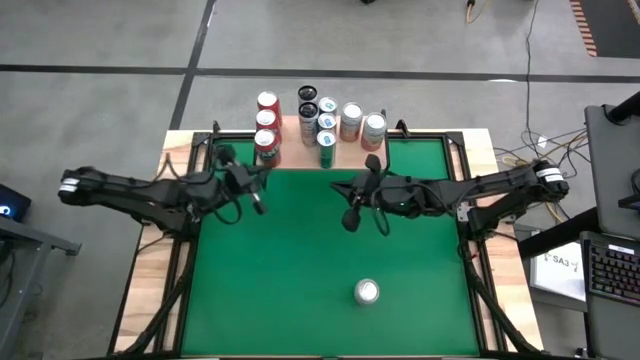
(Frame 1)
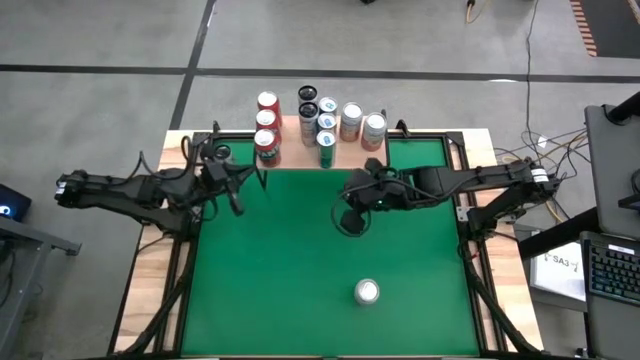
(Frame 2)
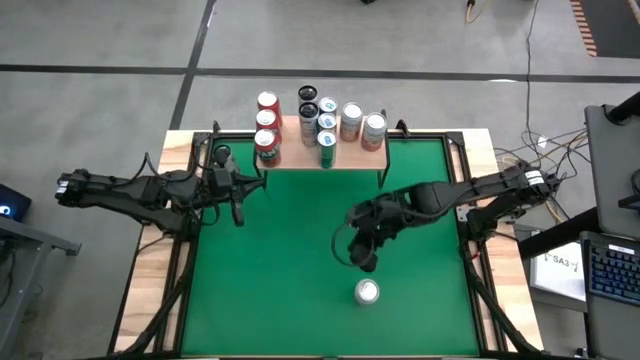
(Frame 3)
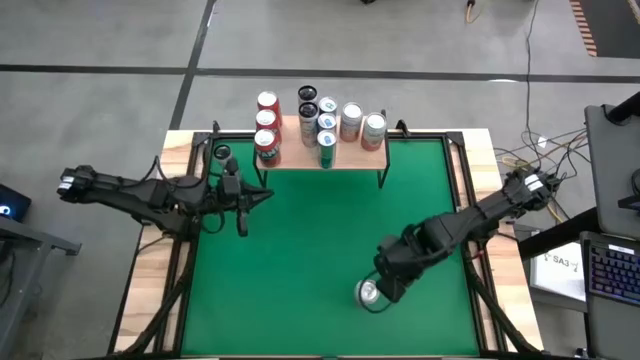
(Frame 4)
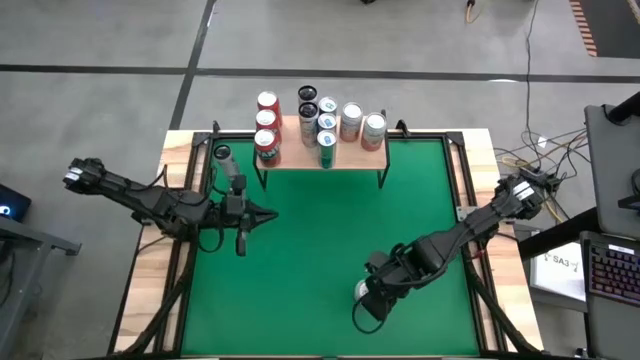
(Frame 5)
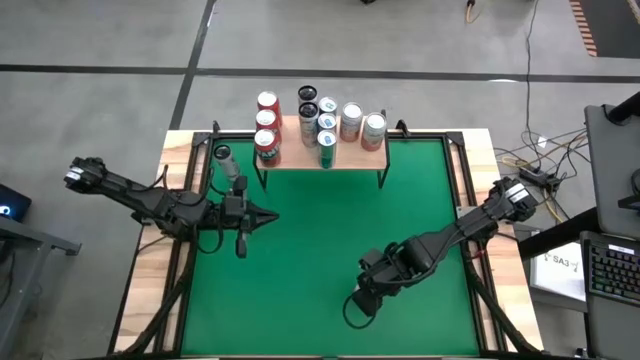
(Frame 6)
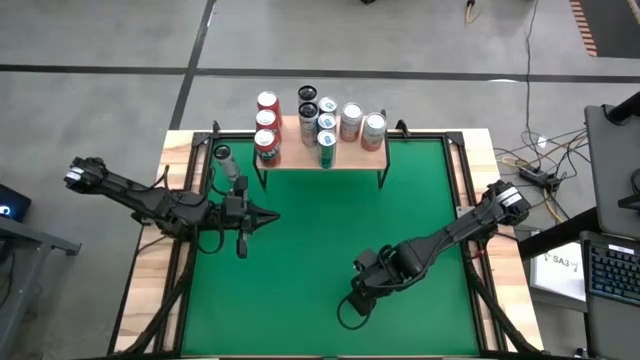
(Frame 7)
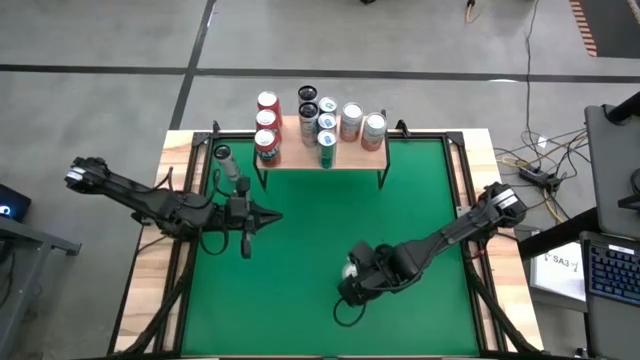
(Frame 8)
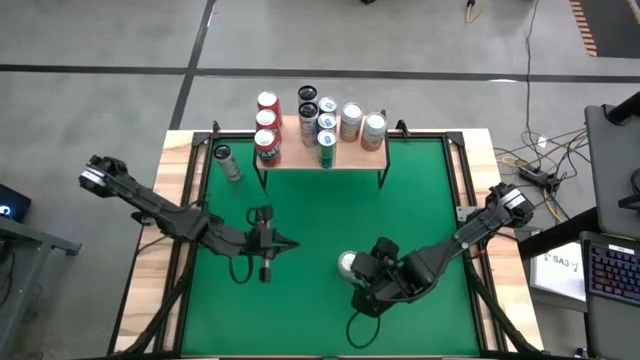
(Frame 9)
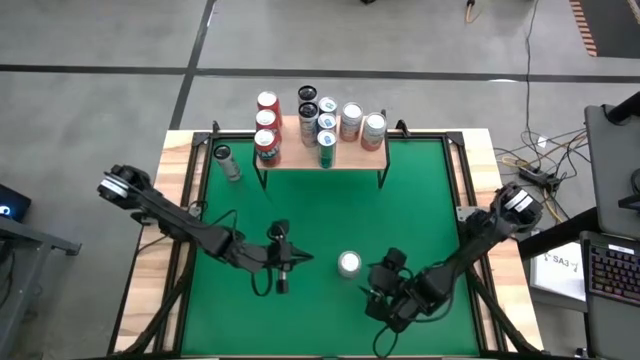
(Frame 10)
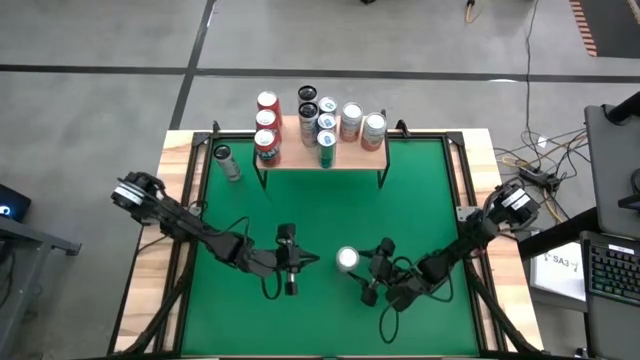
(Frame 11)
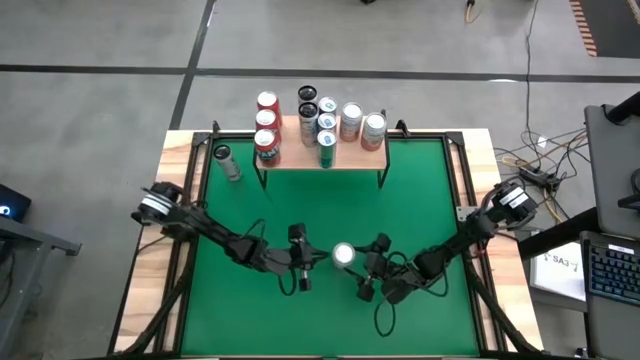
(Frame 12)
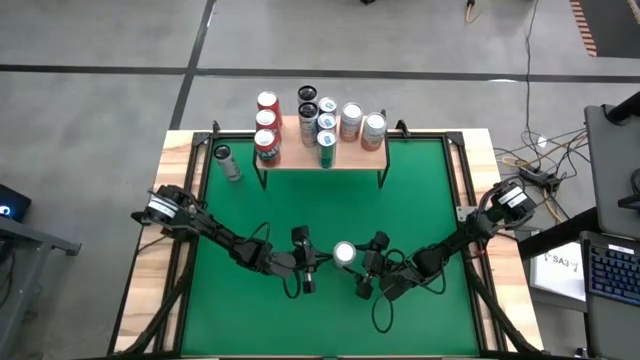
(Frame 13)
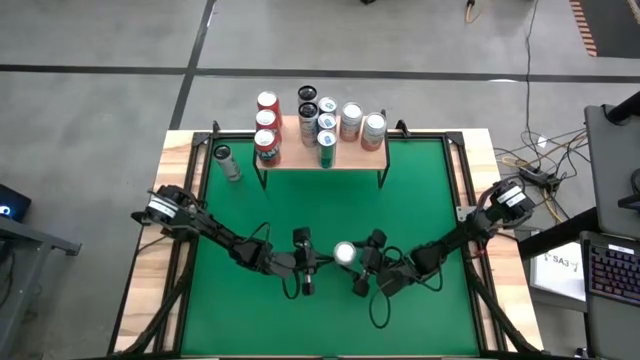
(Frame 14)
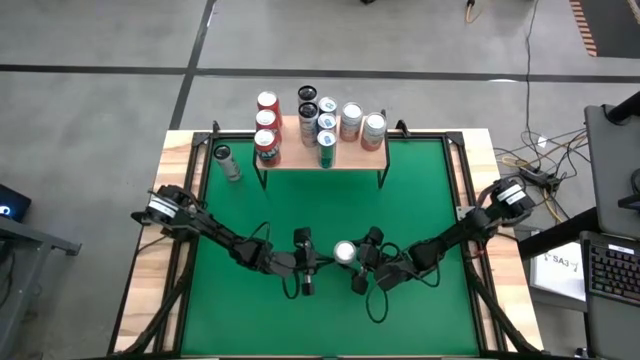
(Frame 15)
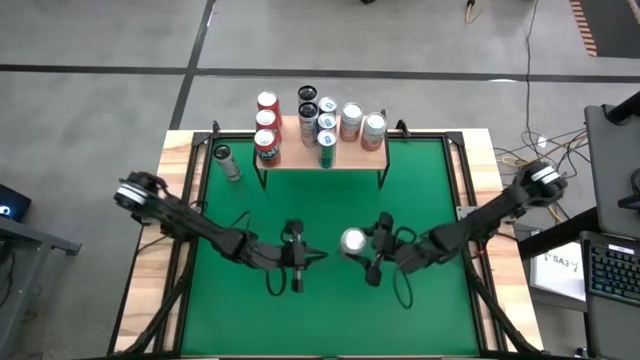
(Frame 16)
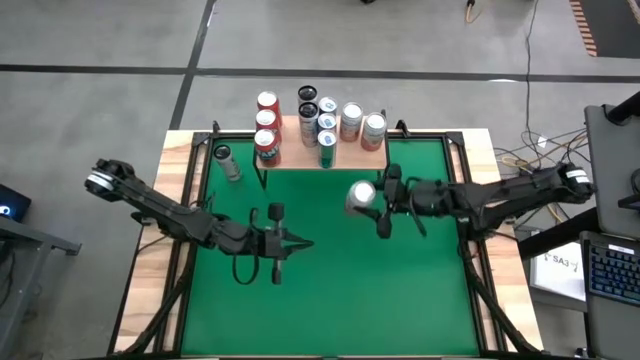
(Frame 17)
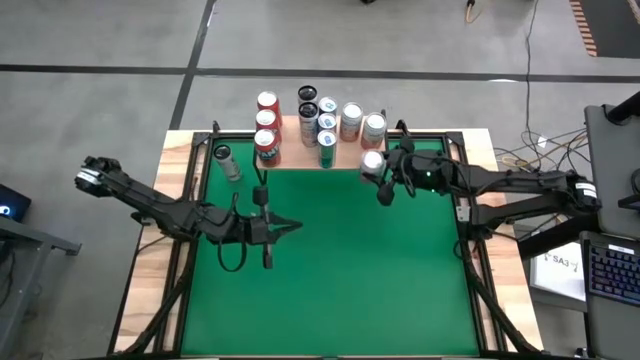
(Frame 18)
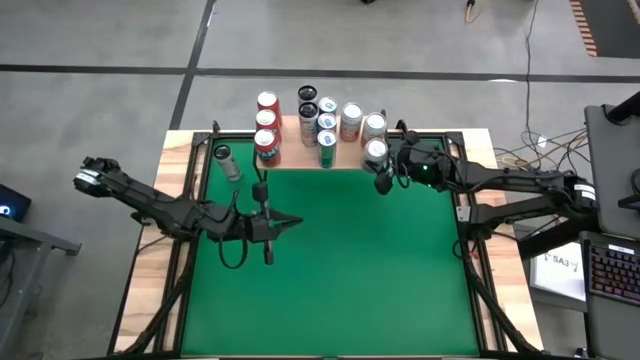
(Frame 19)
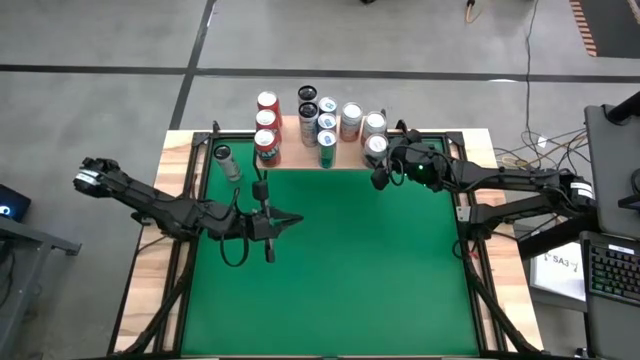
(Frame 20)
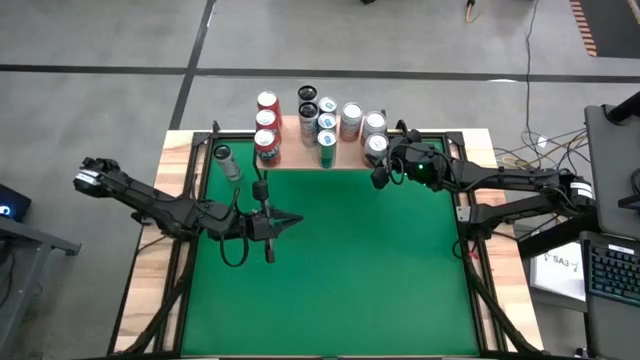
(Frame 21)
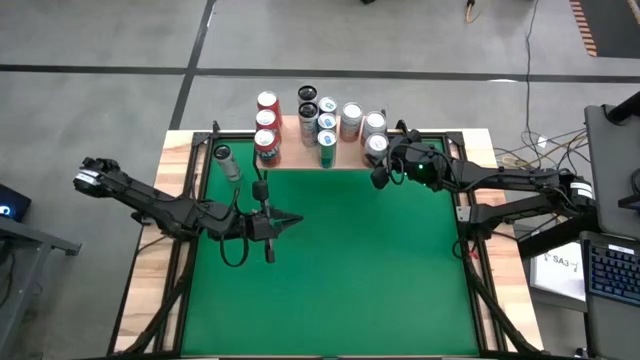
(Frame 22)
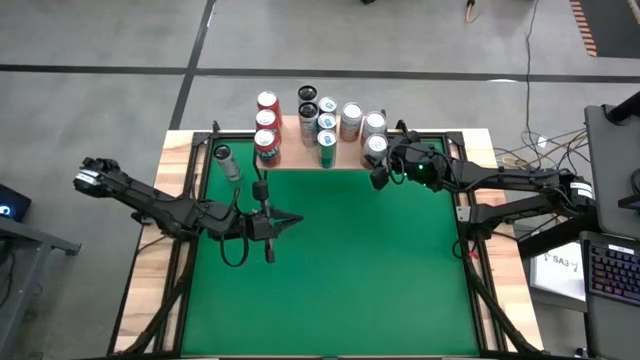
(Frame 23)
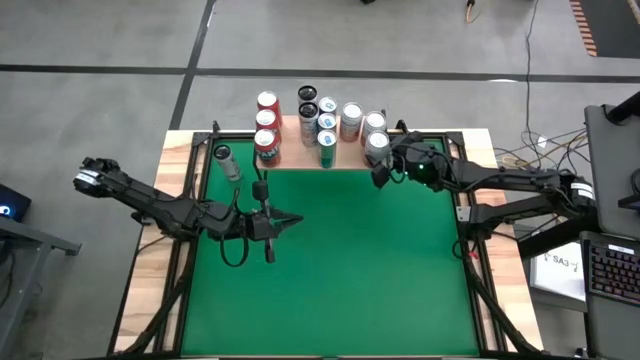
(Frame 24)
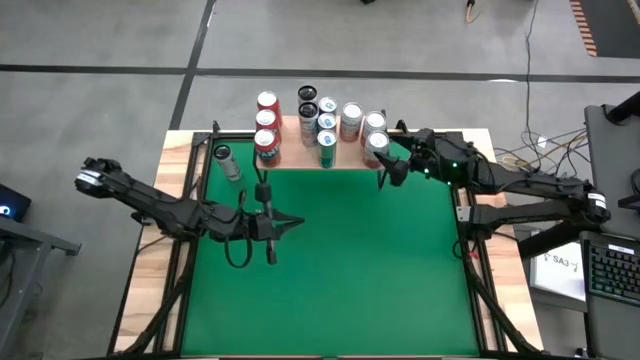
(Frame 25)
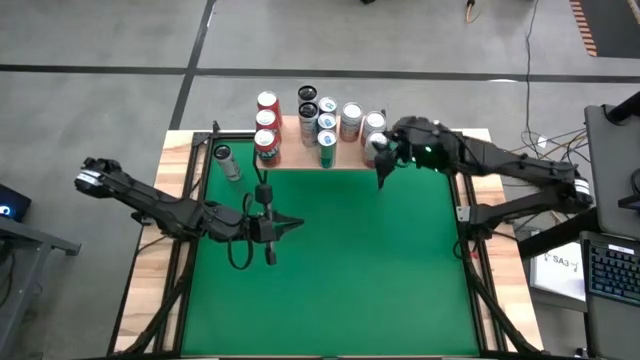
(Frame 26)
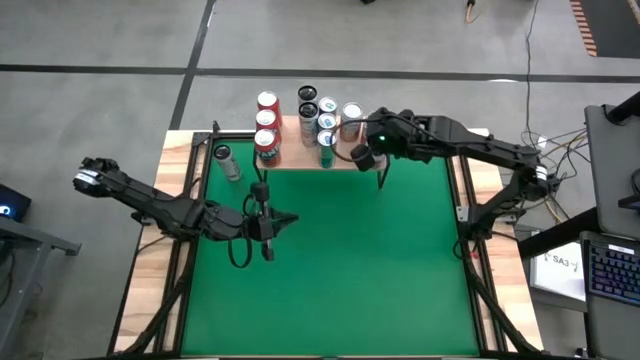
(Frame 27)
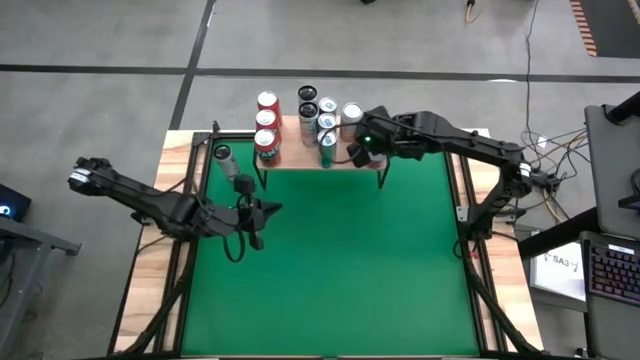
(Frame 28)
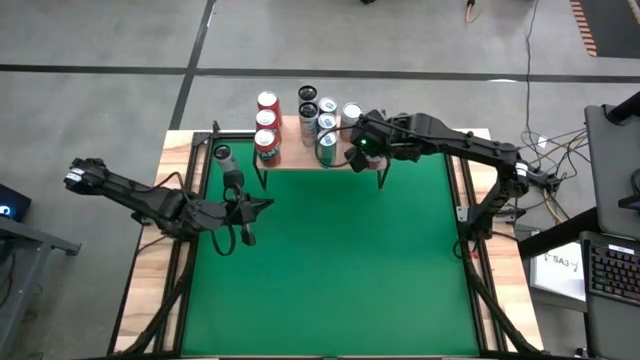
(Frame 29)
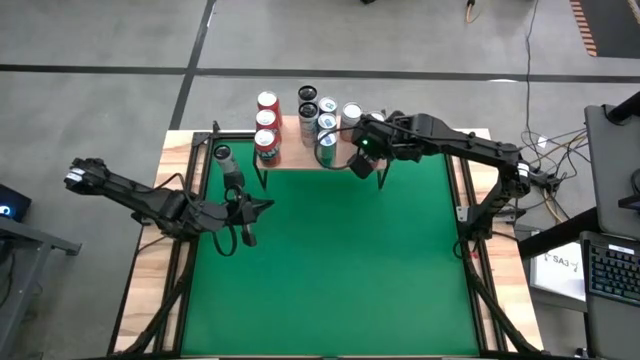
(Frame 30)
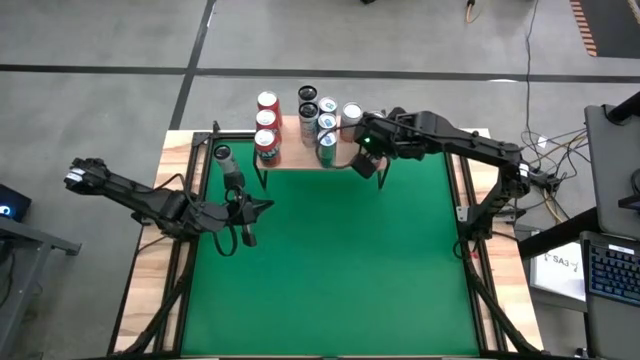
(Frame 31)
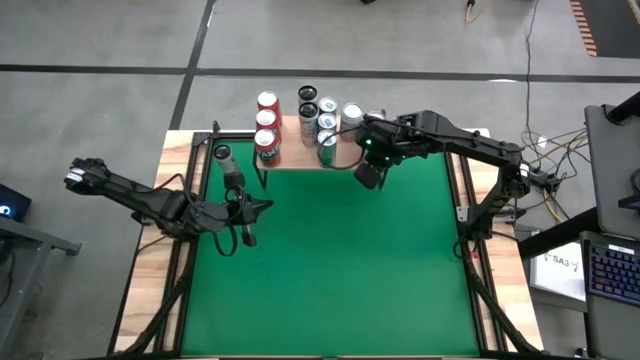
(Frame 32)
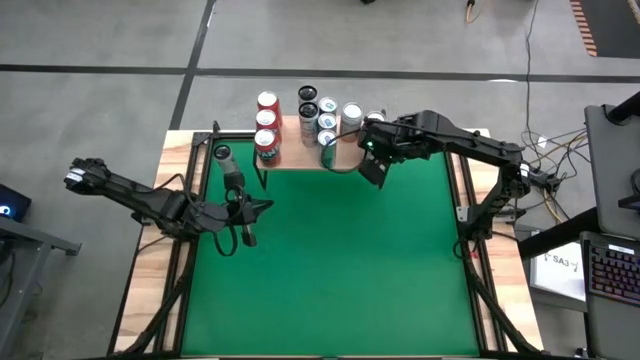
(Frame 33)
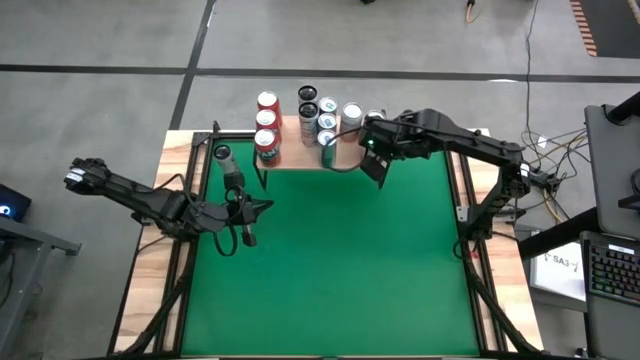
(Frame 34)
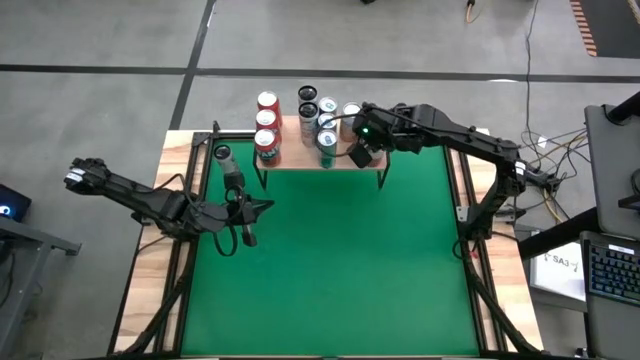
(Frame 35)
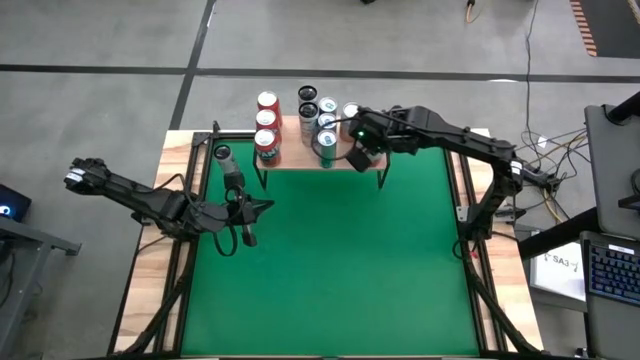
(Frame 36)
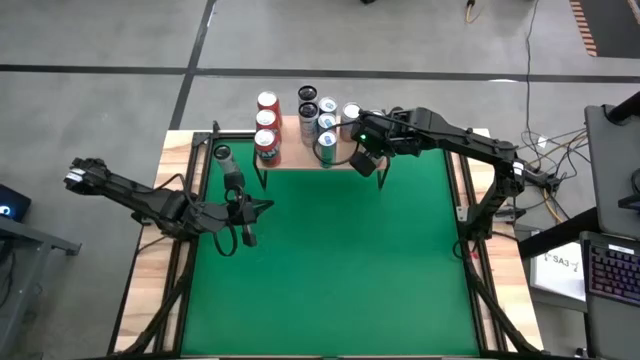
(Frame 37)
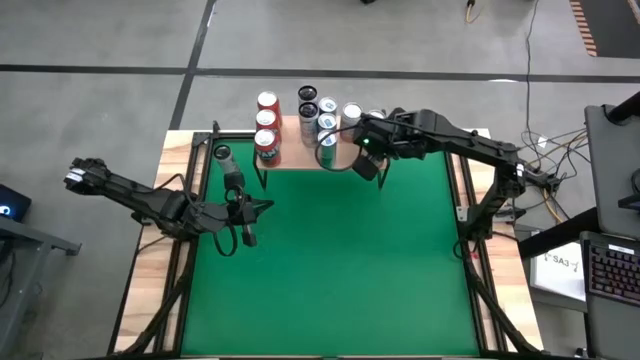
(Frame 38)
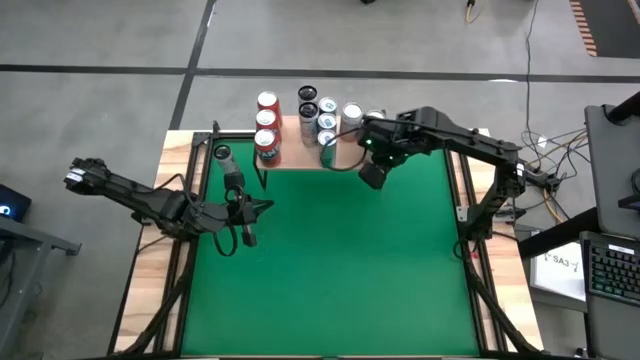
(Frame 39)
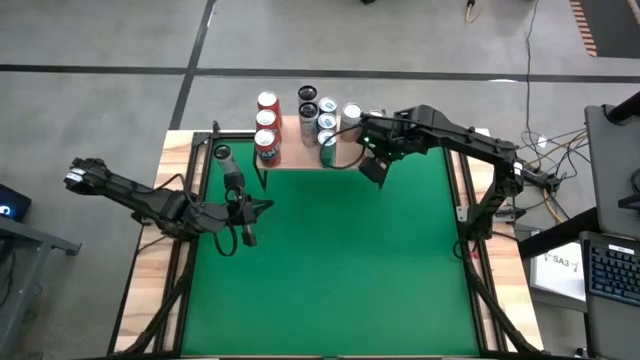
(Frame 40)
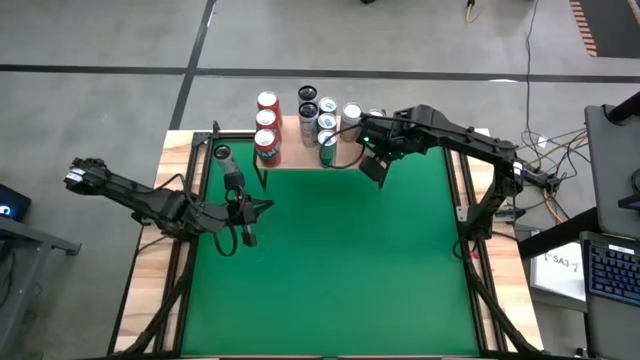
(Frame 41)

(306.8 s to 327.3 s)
Task: Place canned beverage on shelf
Put the white orange soda can on the shelf aligned with other white orange soda cans

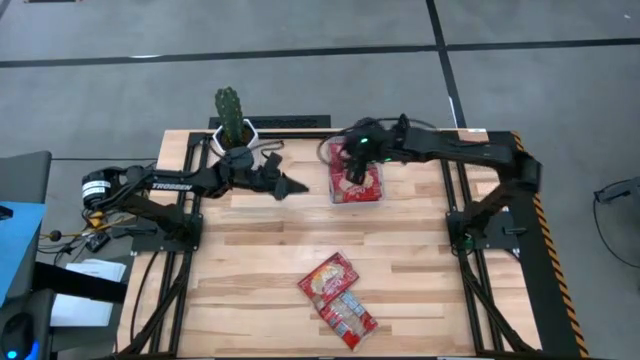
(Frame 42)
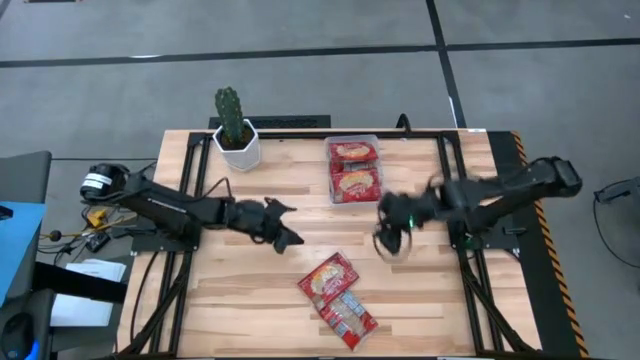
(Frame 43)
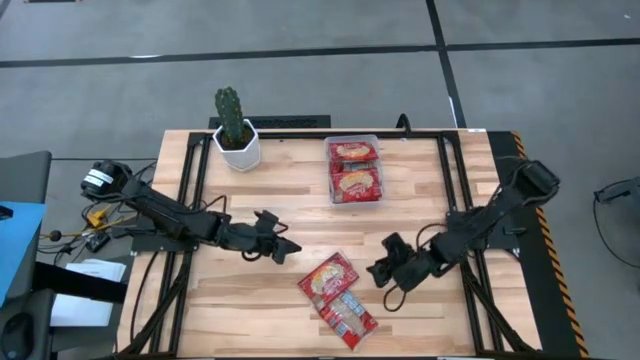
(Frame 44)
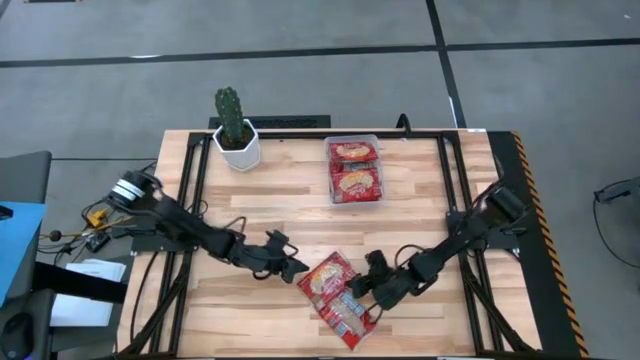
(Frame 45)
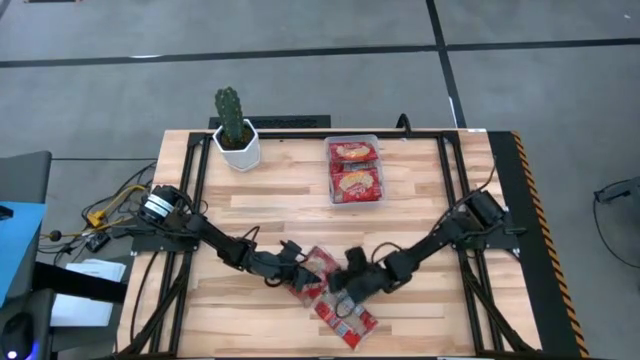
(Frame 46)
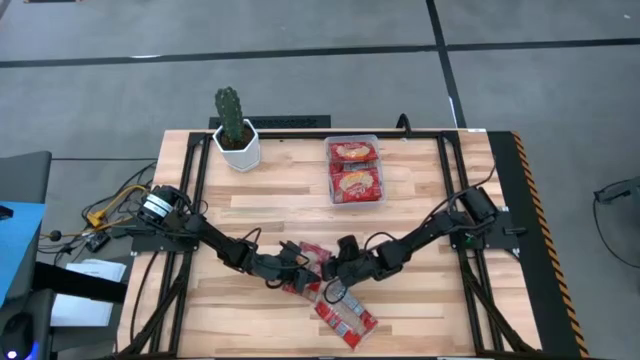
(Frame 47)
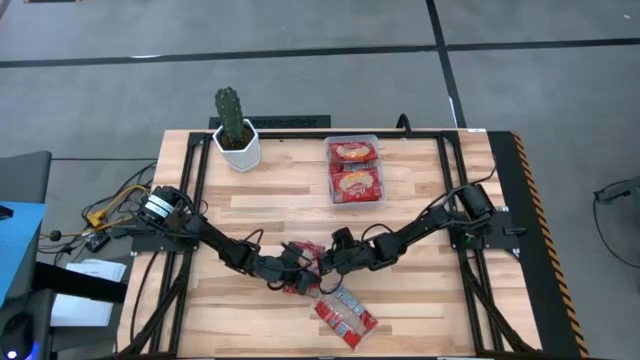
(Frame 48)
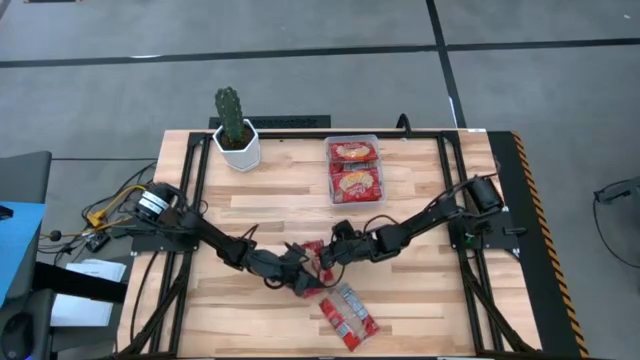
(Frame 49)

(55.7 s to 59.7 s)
Task: Sort popcorn bags into baskets
Put the popcorn bag into the transparent bin
